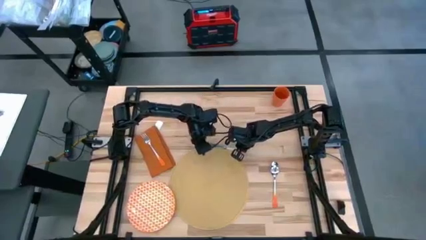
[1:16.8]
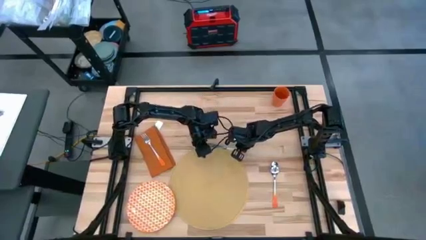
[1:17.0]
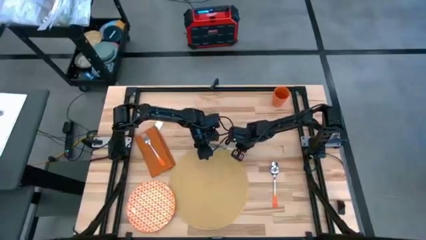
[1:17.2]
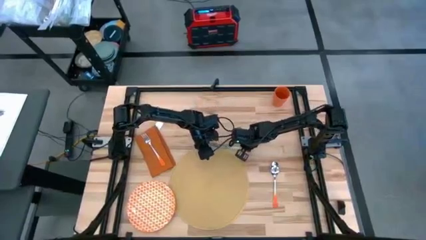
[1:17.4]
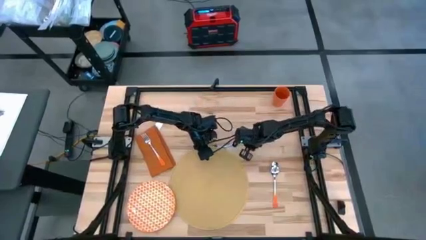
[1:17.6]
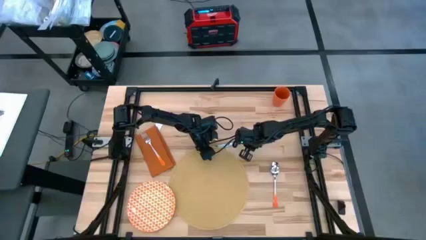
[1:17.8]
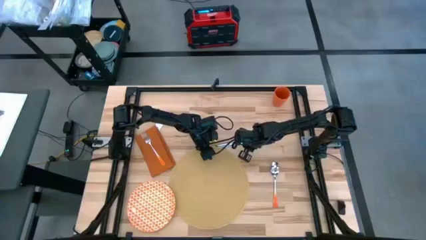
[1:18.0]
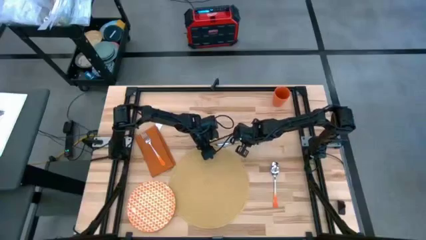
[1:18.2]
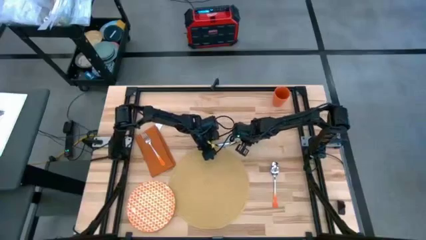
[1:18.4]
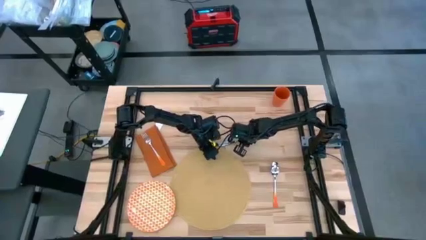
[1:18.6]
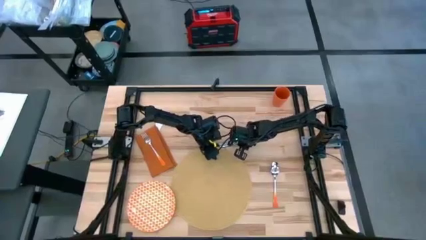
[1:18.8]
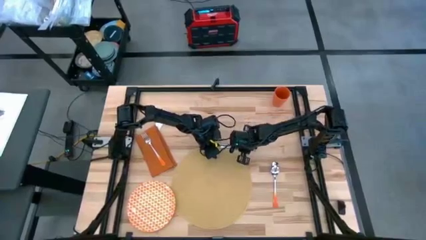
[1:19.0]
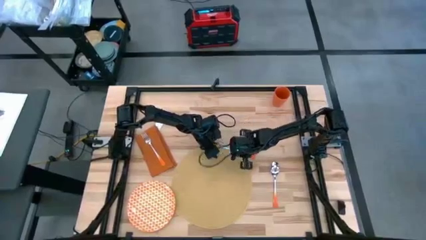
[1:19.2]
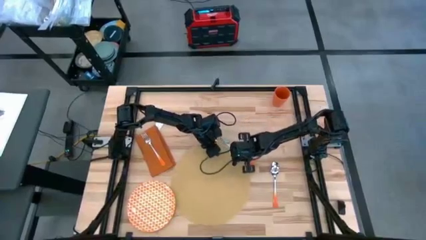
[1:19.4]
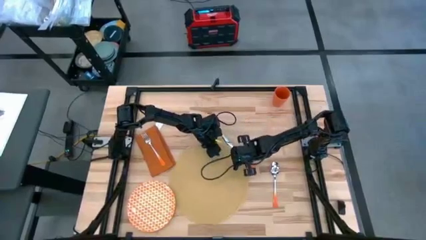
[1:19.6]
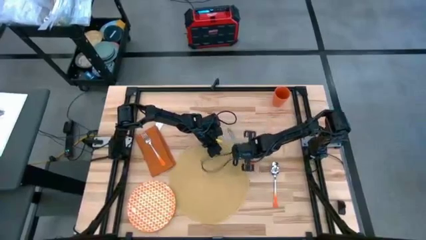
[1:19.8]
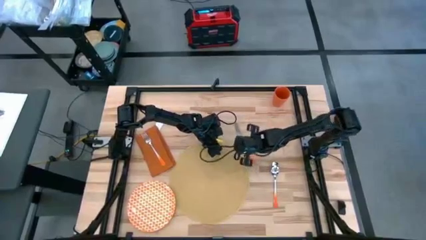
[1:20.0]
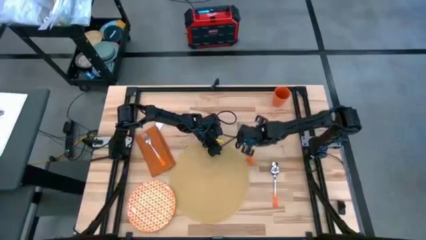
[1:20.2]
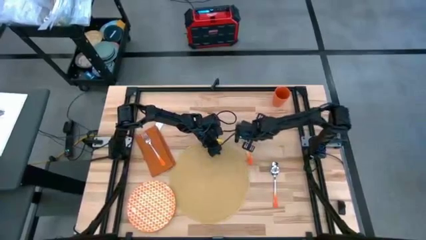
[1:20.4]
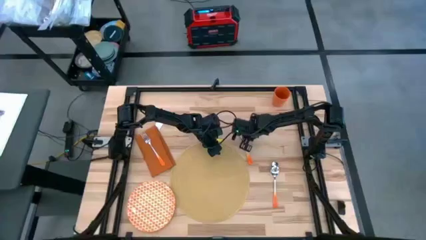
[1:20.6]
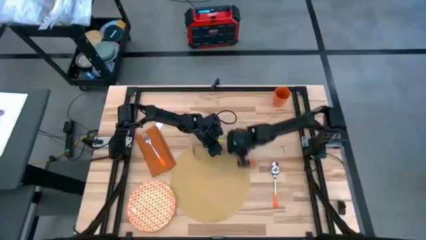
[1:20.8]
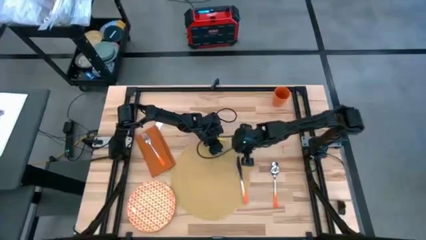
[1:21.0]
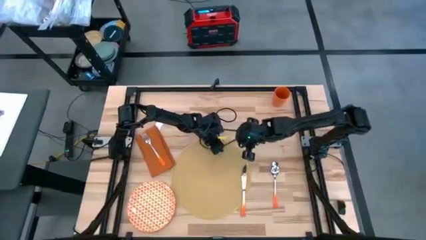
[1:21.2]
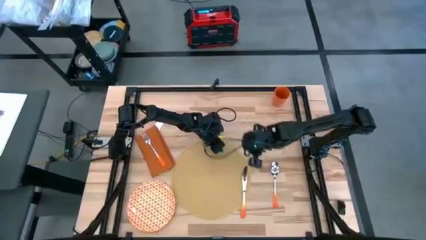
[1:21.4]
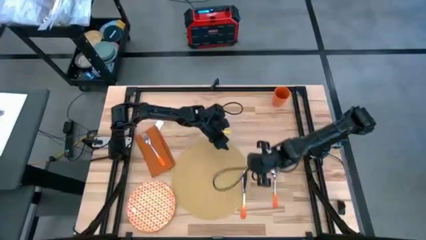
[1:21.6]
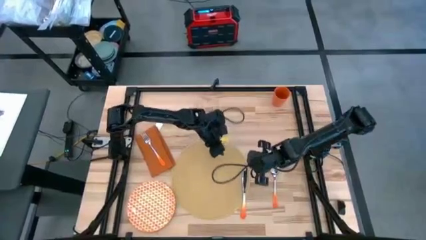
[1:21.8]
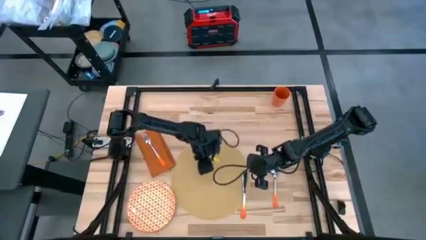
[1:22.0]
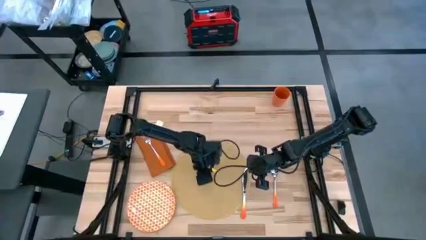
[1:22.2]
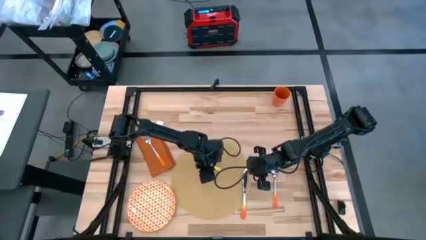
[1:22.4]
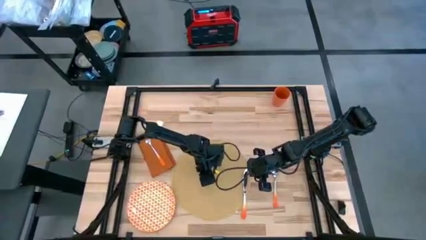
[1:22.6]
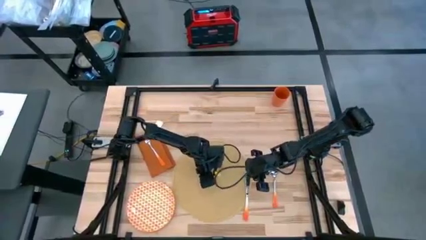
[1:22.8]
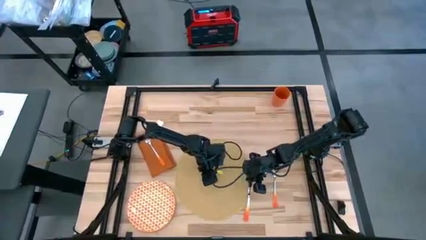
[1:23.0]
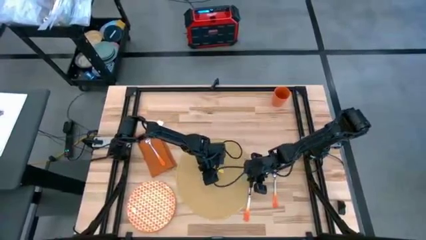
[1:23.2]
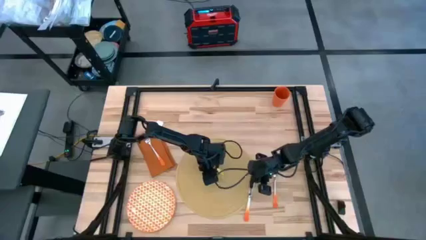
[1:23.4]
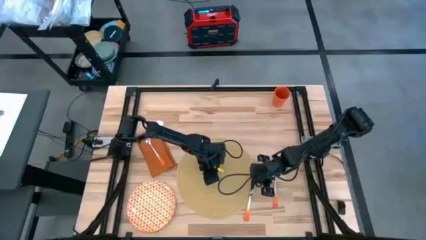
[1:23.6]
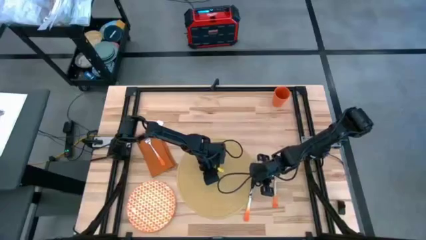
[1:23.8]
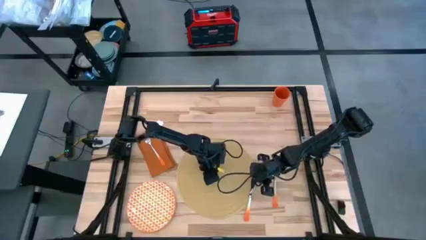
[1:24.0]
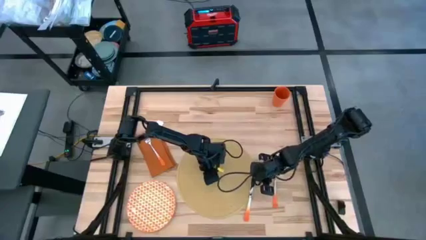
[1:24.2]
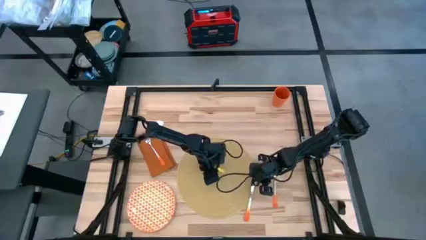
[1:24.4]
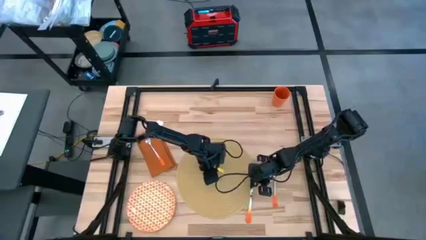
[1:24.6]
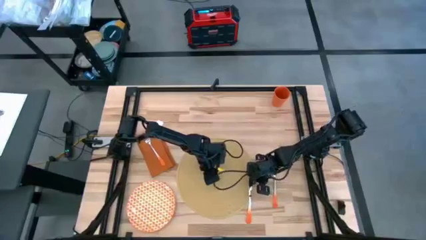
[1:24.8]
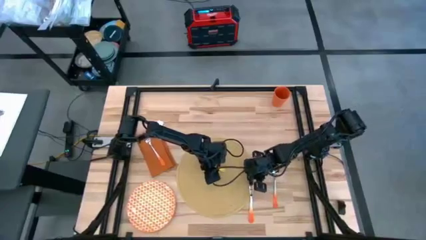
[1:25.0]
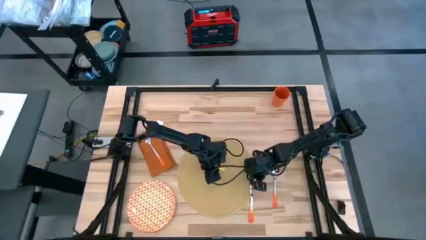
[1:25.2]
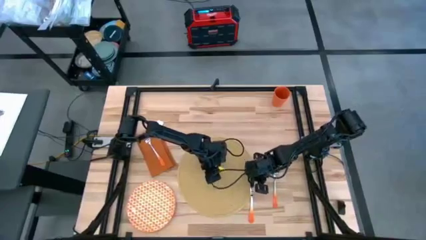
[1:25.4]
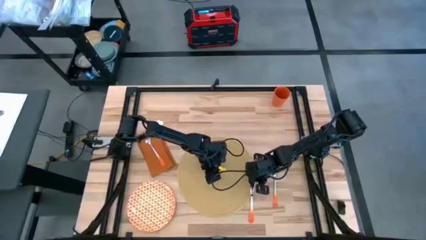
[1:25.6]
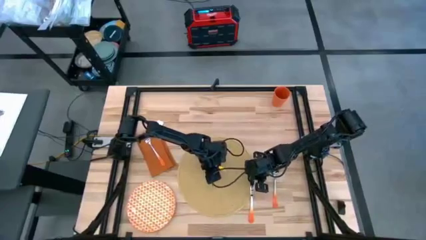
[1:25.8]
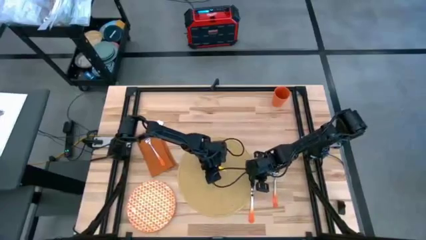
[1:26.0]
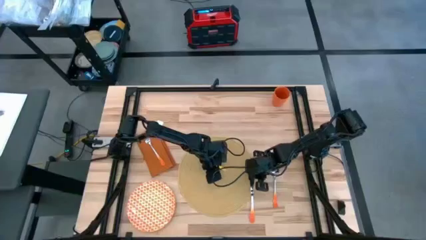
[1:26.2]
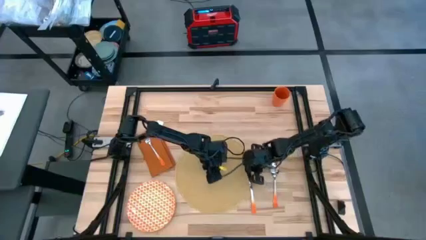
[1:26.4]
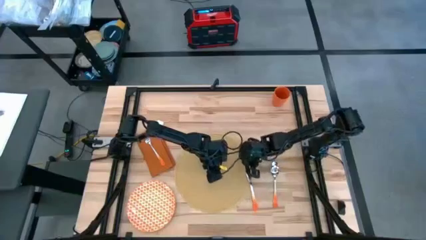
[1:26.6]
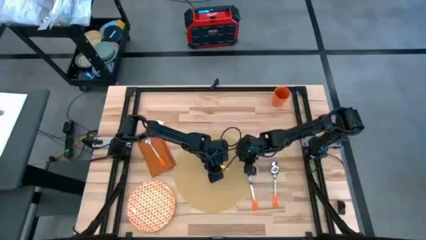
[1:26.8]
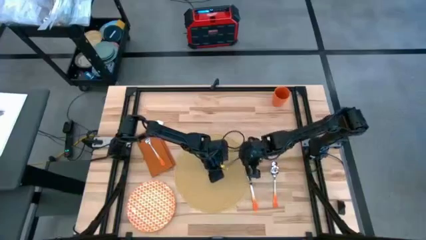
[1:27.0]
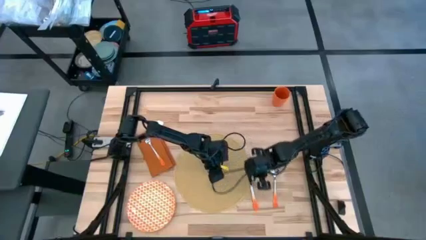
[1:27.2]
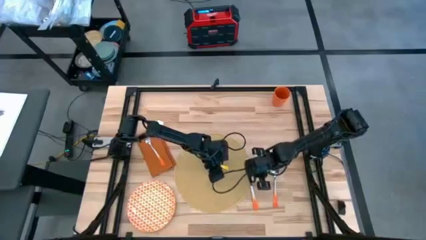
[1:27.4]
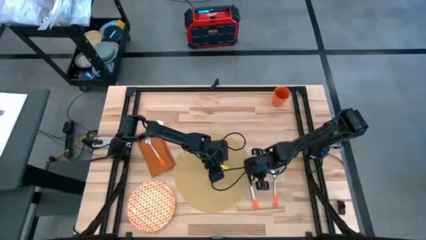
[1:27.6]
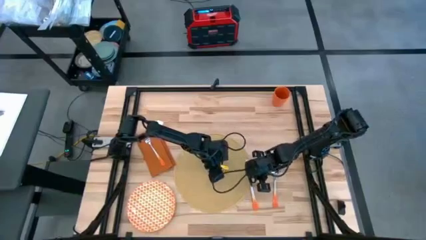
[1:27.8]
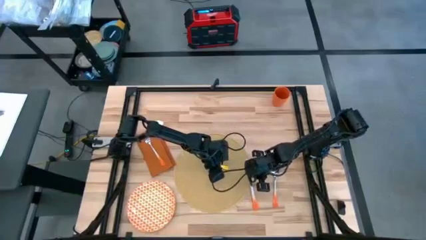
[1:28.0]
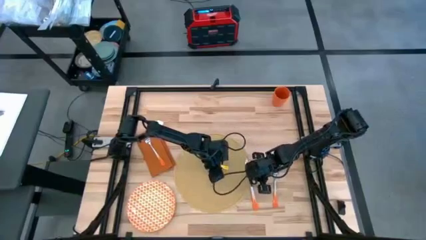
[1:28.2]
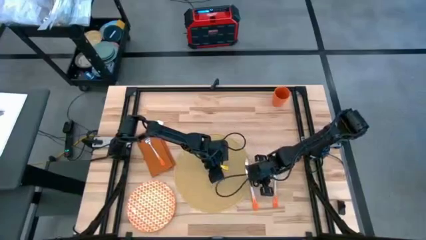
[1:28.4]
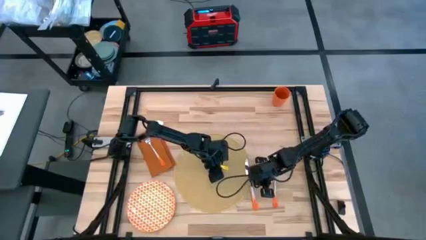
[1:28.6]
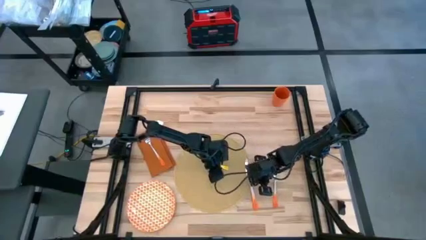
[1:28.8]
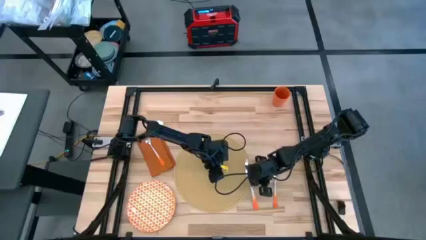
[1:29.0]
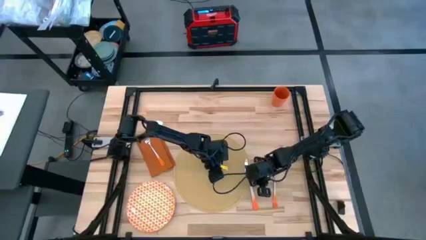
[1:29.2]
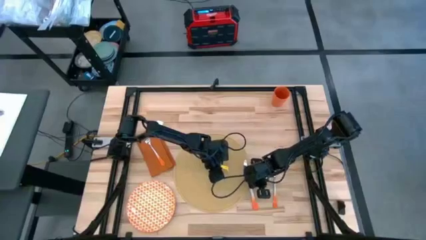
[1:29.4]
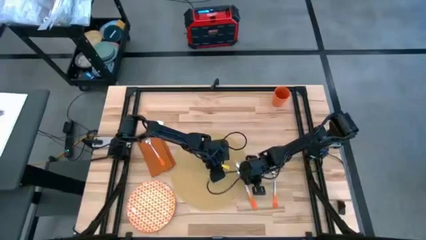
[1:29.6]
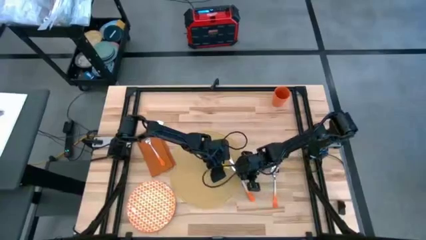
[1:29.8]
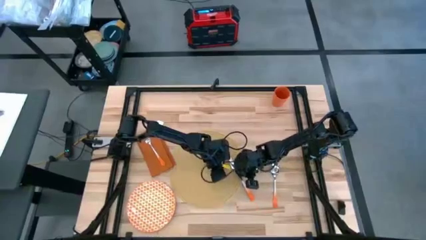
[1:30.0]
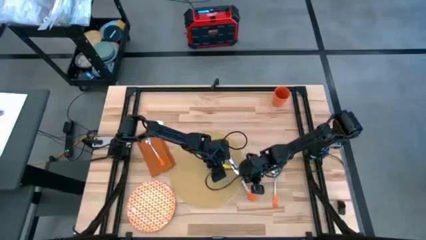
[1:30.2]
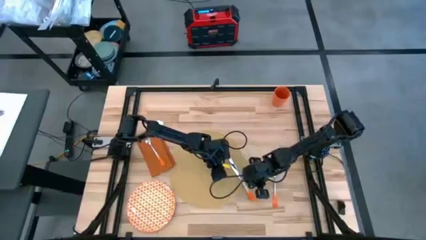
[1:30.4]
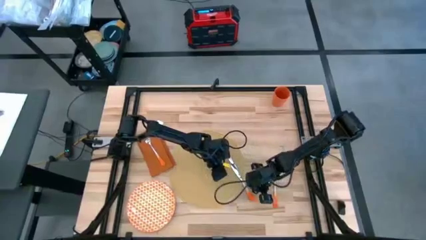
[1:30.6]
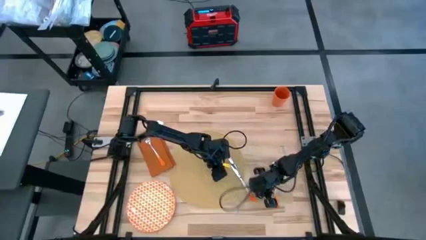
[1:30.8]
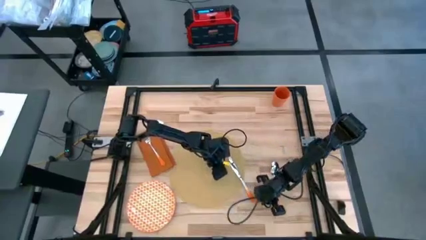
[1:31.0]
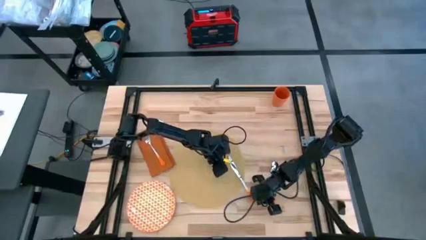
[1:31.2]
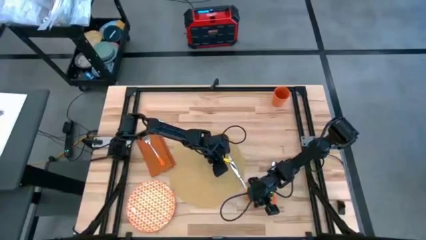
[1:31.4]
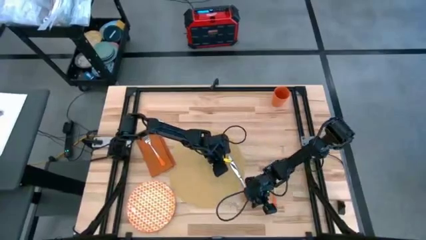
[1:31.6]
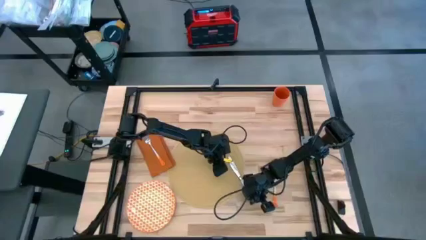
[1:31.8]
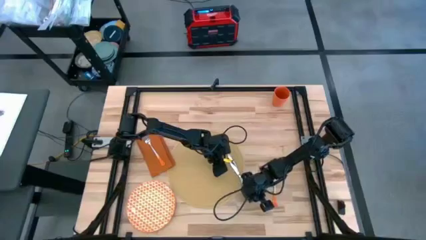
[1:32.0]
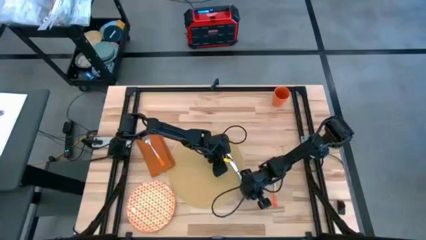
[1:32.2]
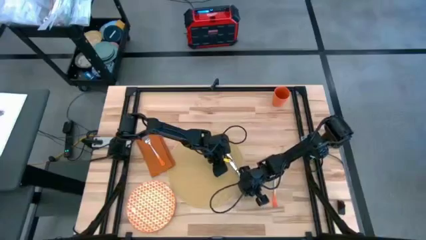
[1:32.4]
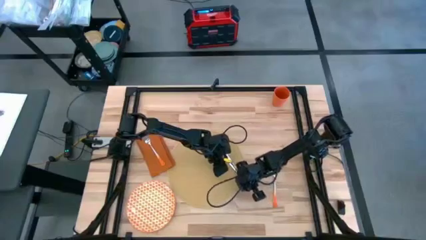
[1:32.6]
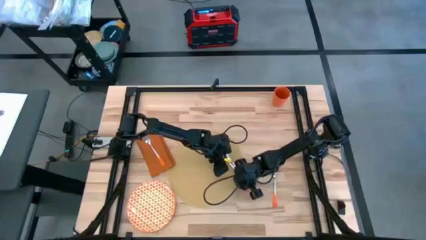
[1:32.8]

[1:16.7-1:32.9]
Task: Set table place
Put the table knife on the placemat

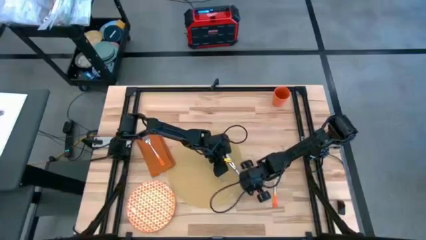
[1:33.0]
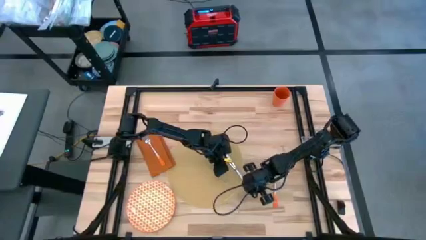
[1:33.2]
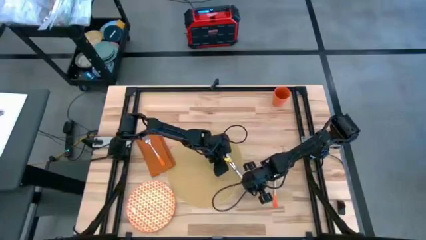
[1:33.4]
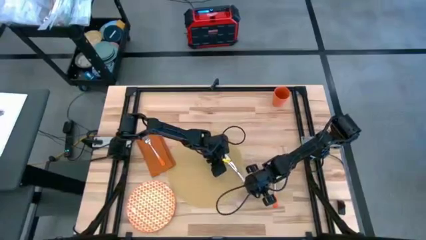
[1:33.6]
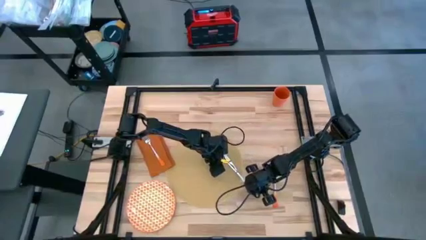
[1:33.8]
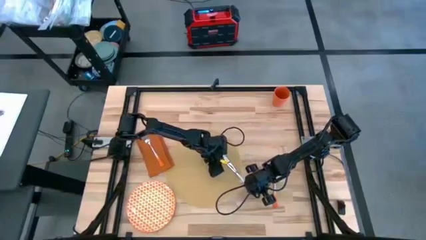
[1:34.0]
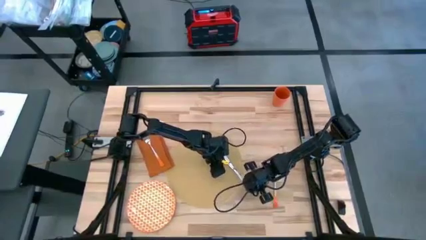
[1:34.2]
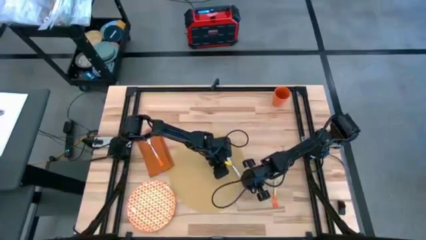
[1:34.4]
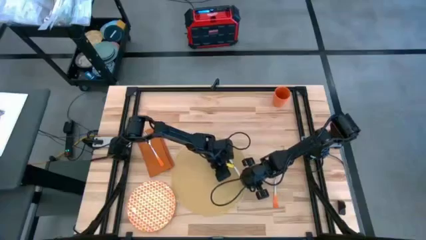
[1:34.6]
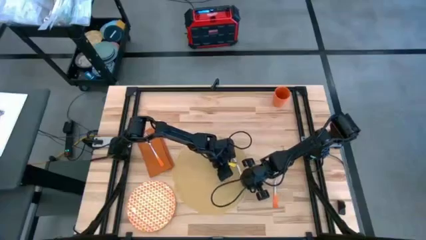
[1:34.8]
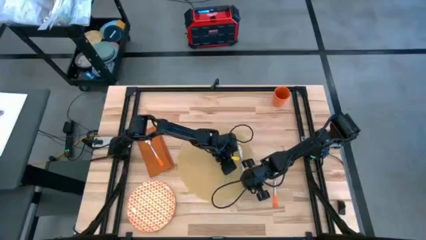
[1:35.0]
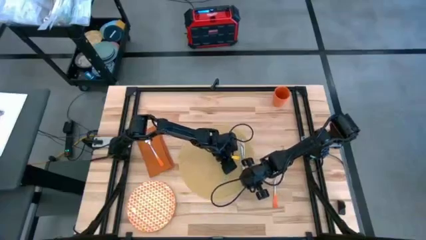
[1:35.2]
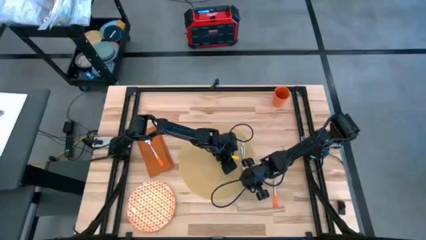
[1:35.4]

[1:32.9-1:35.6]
Put the table knife on the placemat
